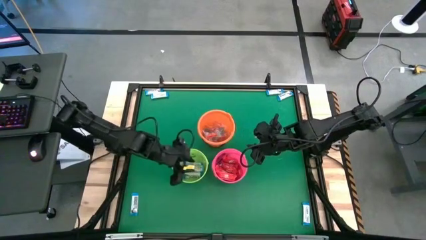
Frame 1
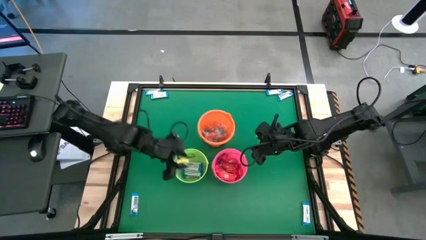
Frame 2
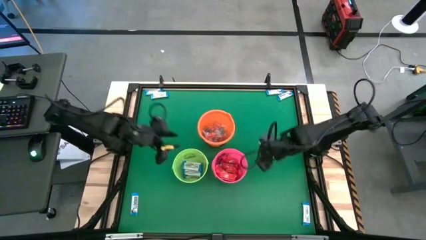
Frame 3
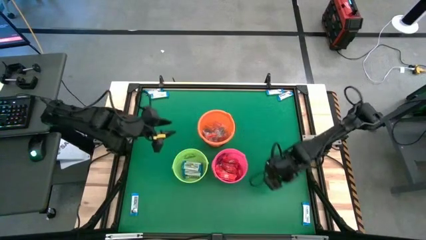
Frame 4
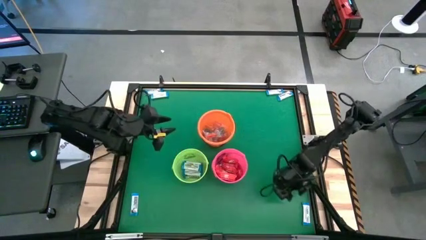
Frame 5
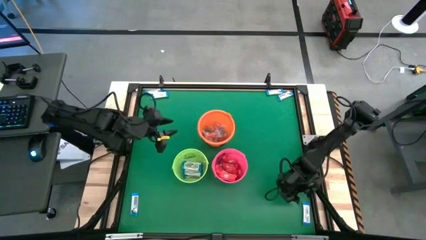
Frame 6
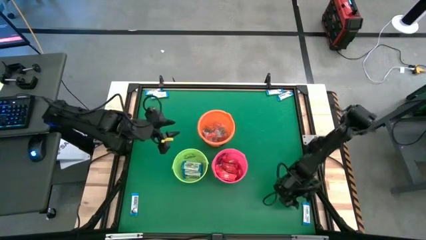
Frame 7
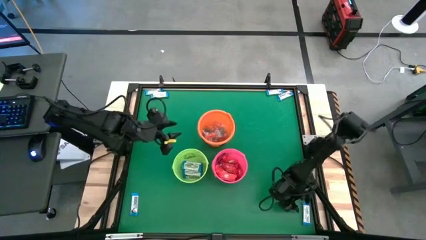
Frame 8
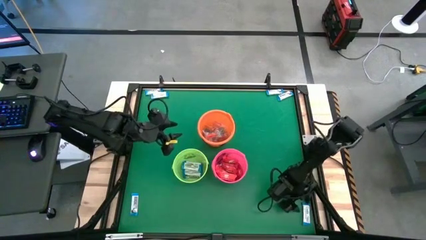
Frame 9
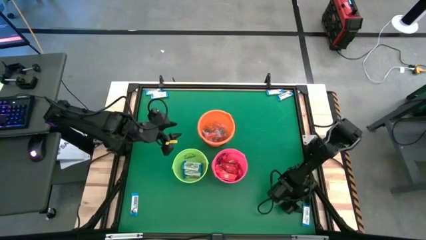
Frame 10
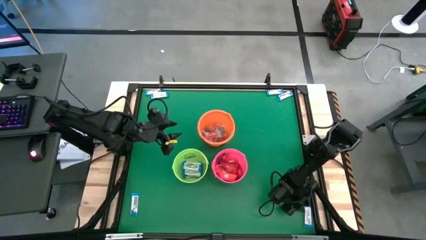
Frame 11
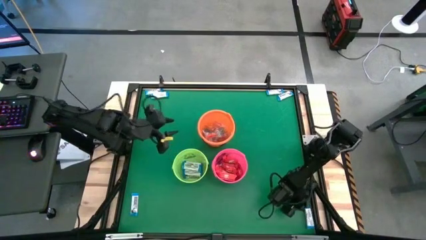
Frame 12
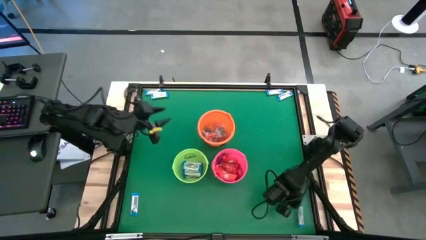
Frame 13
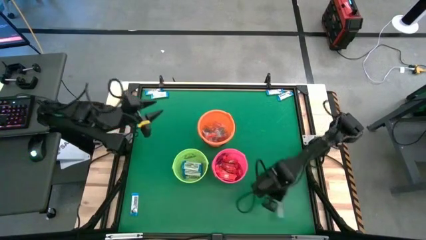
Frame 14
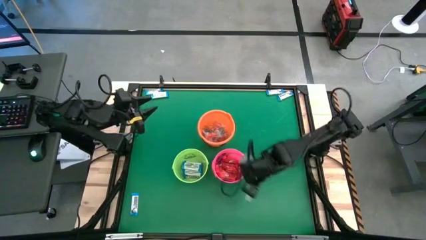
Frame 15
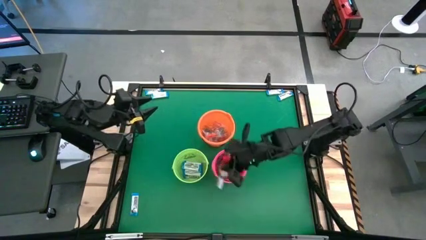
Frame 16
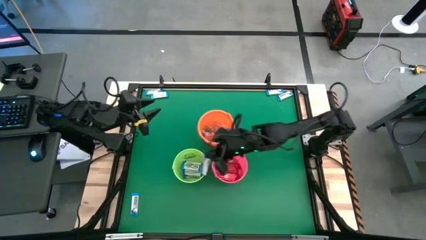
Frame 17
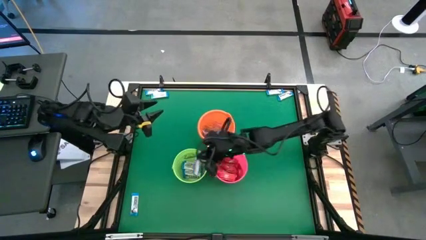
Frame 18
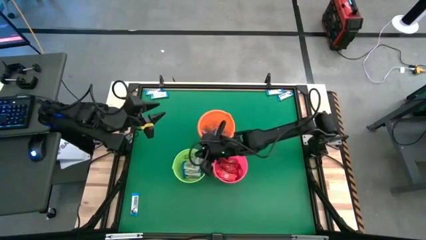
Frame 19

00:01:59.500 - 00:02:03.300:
Task: Sort candy by brand, put in halloween buckets
Put the white chocolate bar into the green bucket

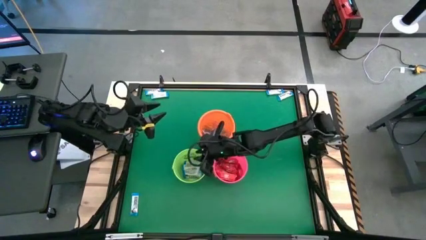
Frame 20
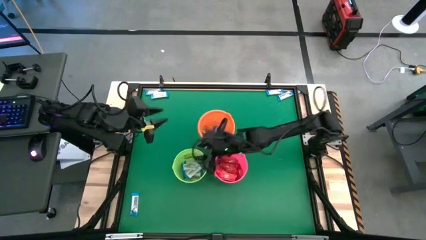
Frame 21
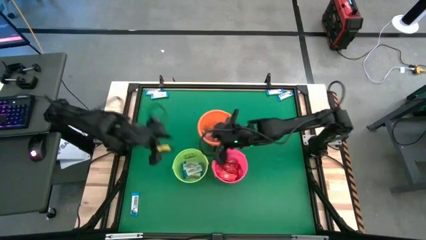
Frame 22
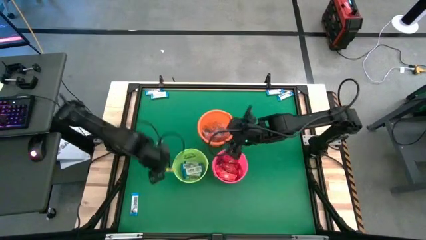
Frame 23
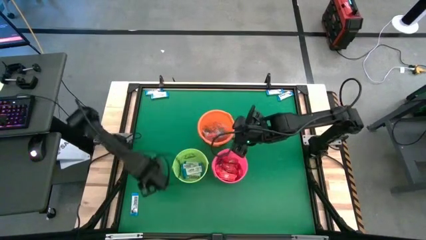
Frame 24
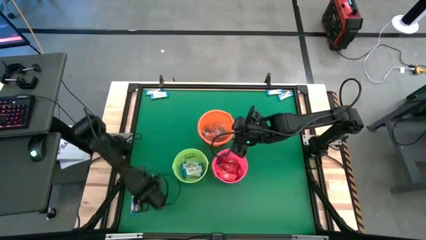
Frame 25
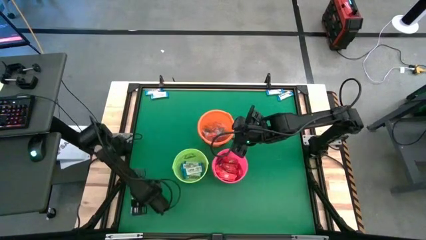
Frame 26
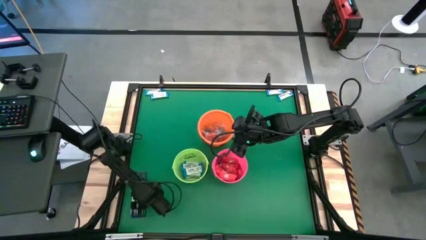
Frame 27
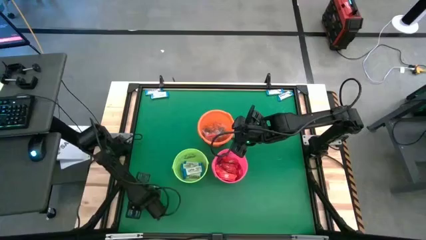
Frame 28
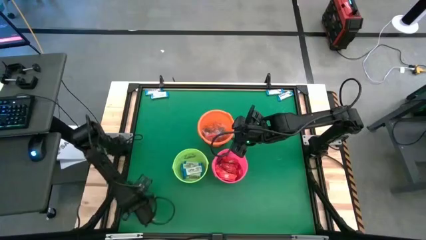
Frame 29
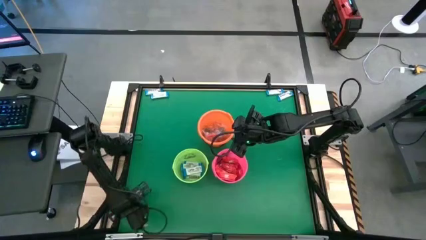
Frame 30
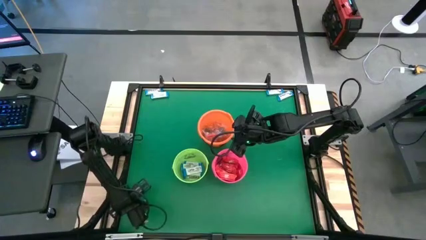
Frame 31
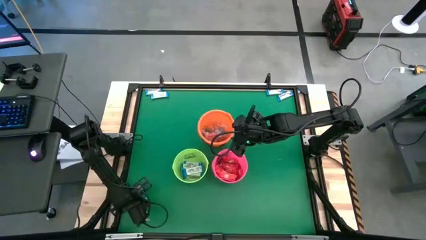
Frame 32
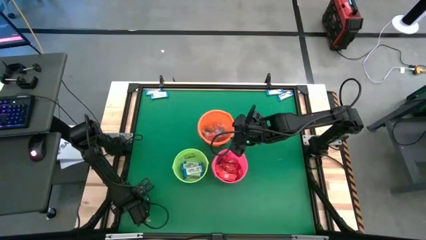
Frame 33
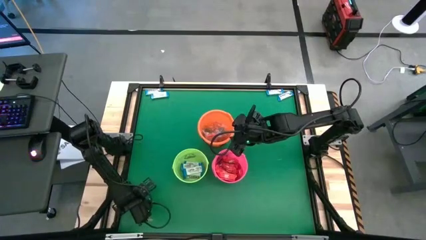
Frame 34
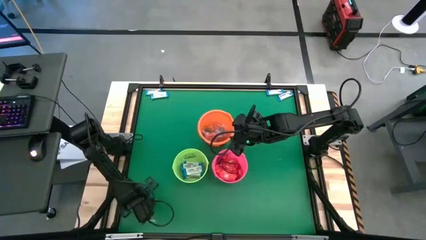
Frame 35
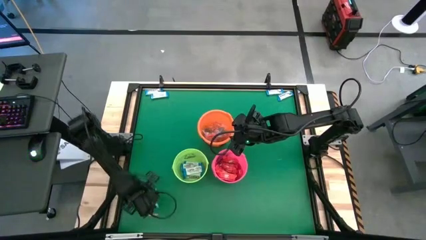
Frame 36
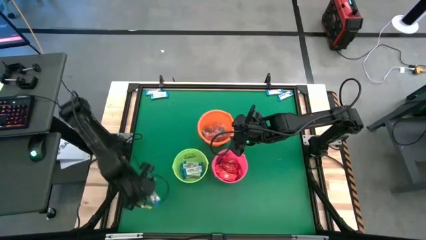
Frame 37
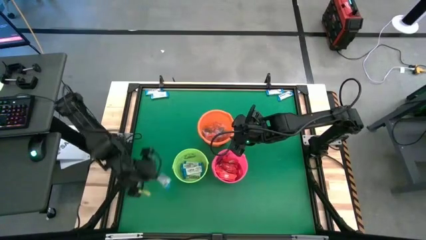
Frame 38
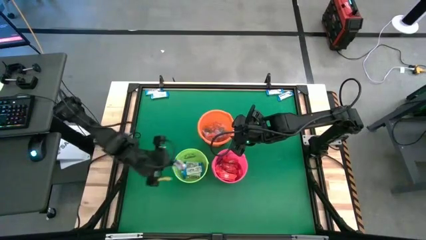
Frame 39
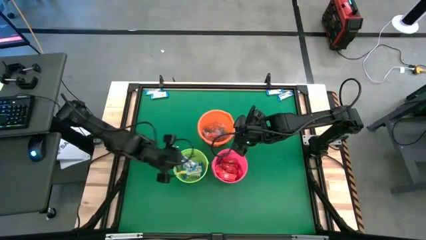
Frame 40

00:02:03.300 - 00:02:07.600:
Put the white chocolate bar into the green bucket

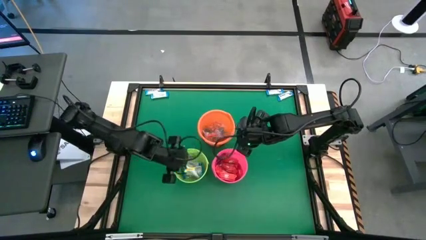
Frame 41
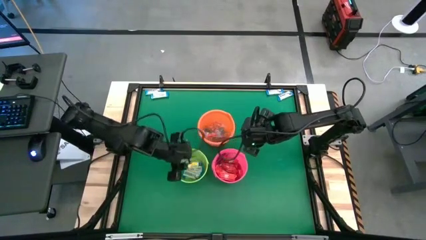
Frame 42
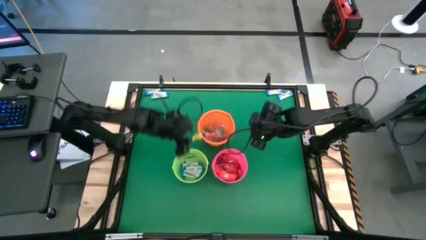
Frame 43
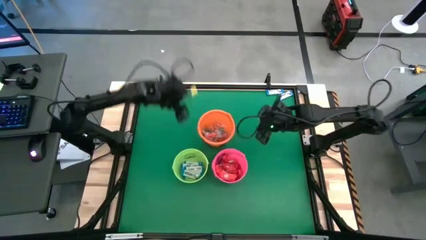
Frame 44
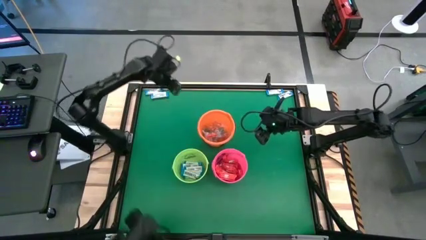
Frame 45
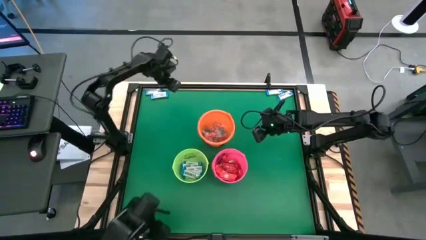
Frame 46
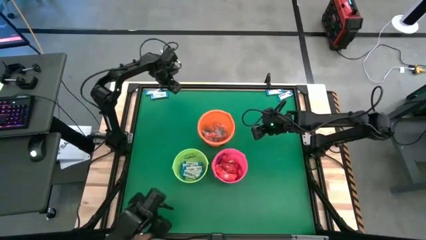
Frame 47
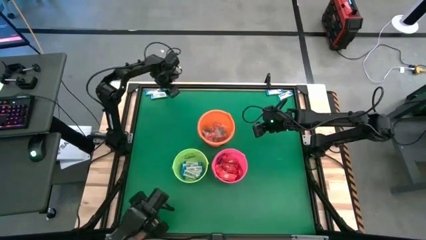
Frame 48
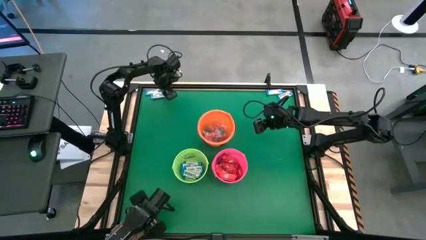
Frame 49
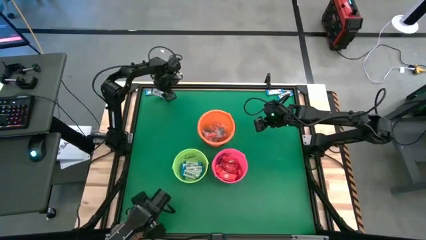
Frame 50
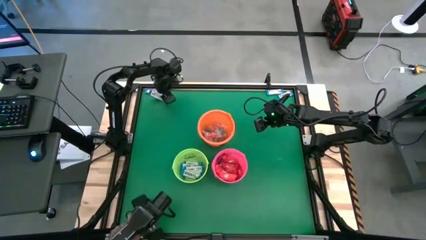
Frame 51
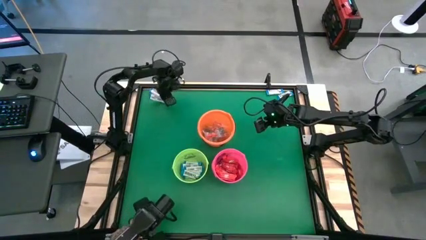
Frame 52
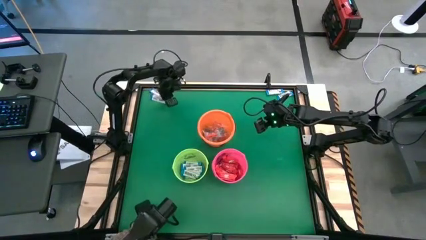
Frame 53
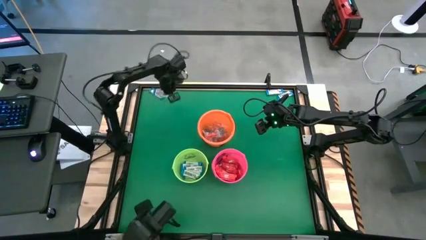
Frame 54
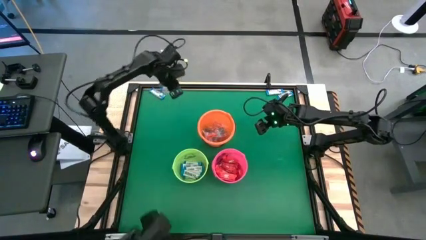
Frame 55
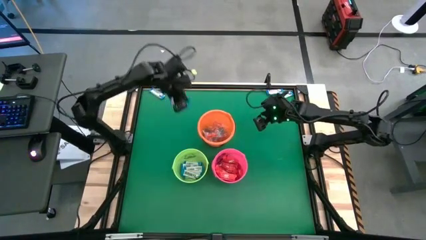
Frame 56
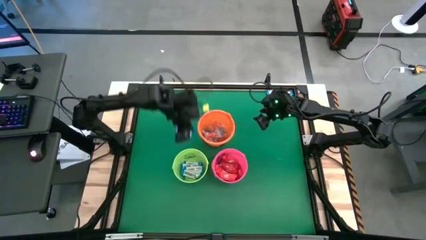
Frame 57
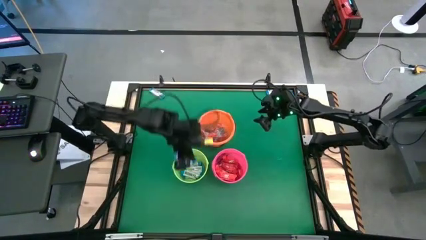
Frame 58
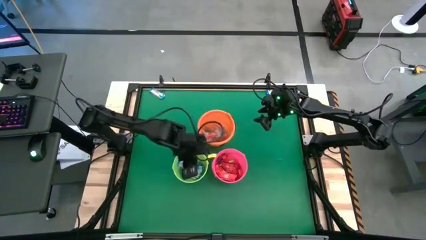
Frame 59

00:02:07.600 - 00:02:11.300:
Put the white chocolate bar into the green bucket

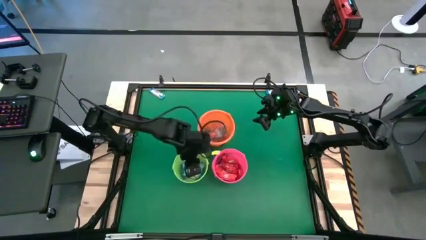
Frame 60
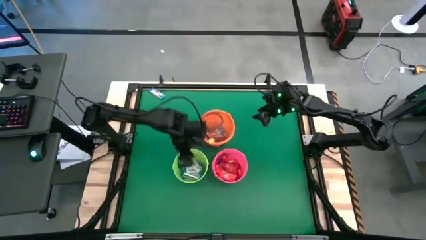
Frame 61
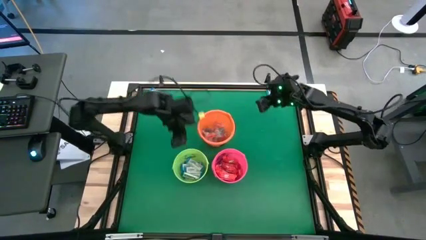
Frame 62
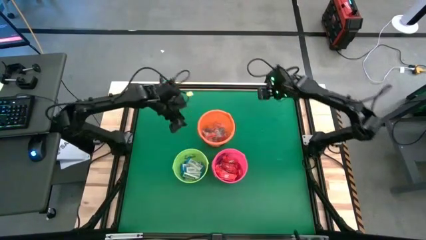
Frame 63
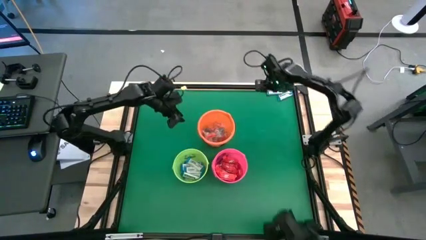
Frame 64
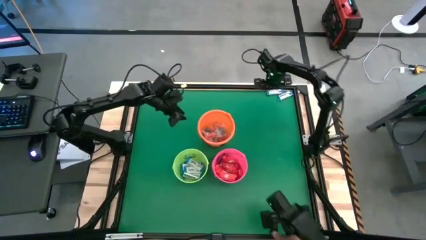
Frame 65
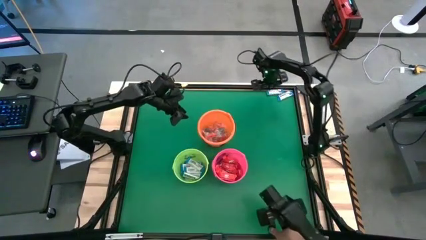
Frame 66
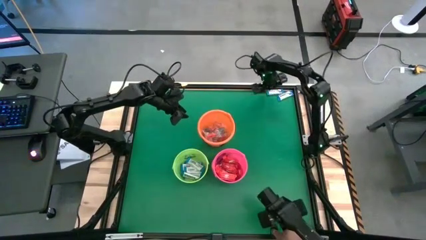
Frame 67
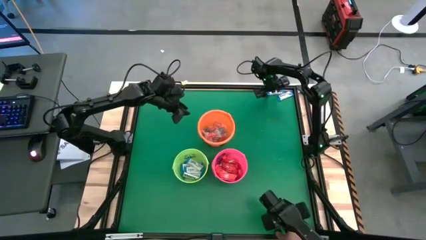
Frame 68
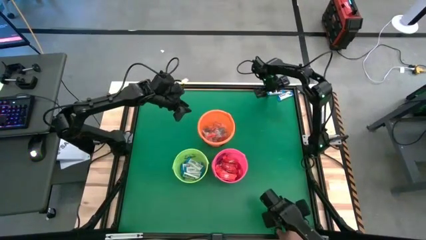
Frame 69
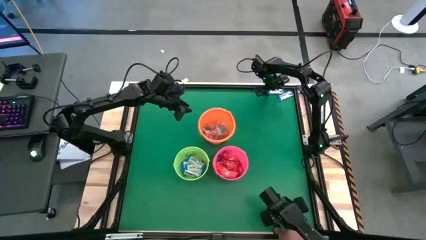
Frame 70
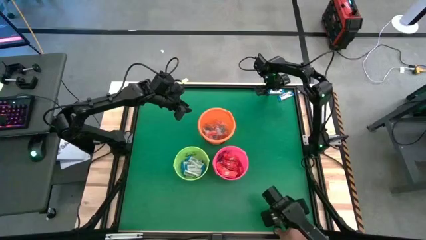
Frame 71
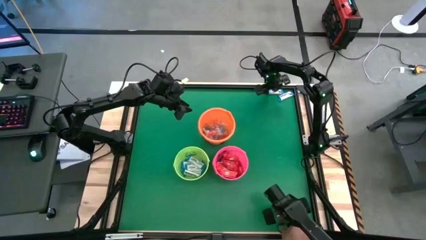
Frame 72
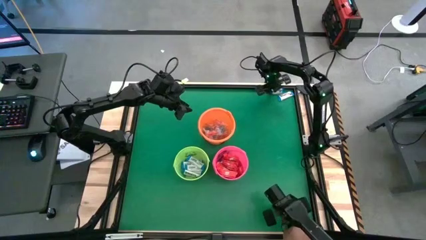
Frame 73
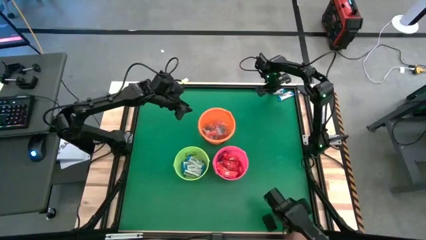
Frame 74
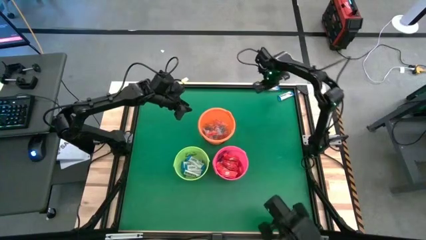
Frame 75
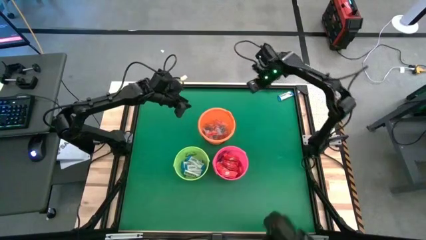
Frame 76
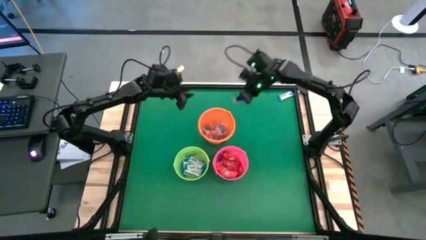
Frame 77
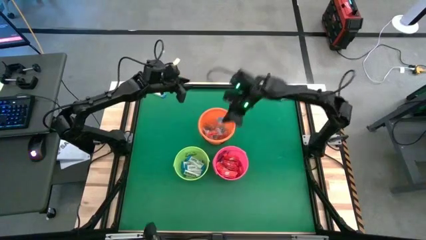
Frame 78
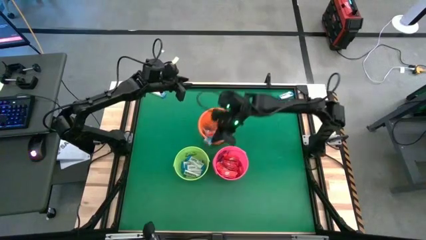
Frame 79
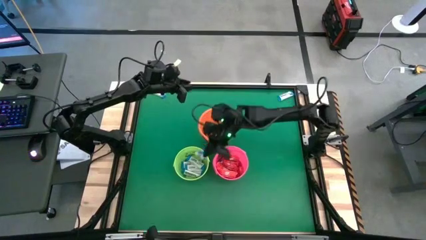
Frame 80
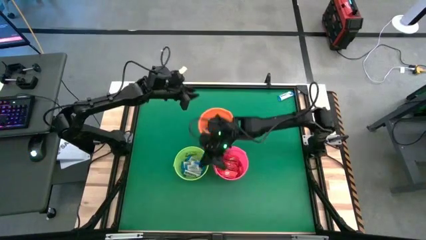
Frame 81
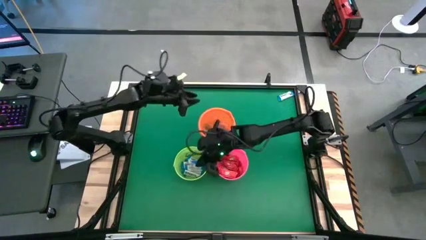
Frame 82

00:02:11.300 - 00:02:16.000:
Put the white chocolate bar into the green bucket

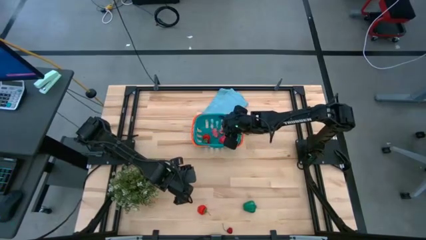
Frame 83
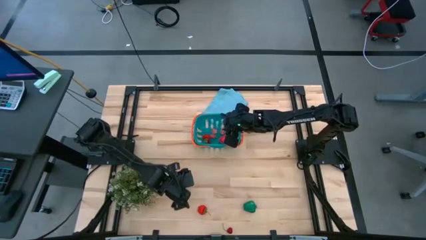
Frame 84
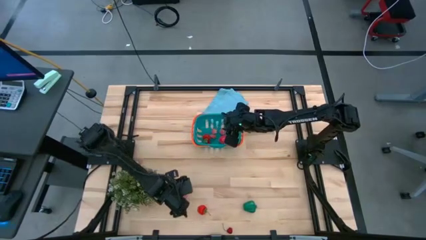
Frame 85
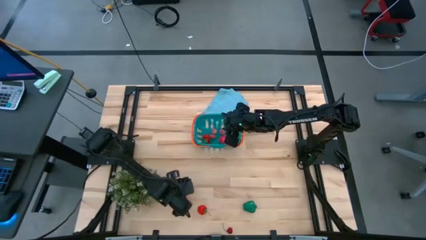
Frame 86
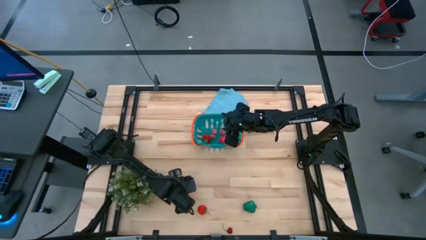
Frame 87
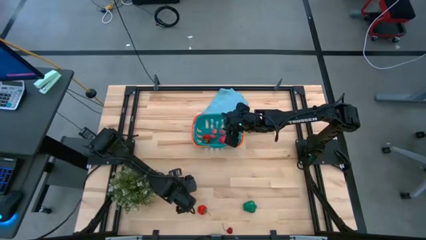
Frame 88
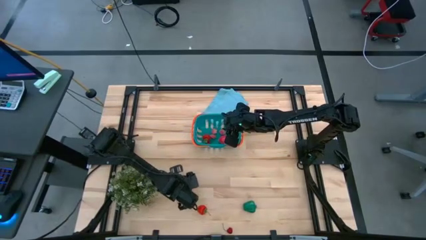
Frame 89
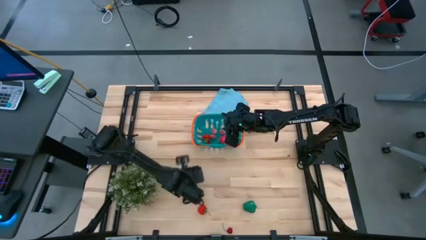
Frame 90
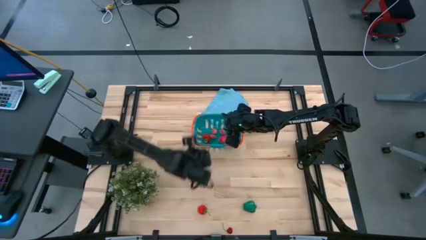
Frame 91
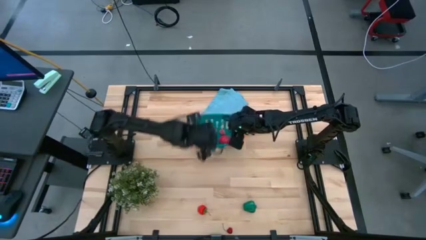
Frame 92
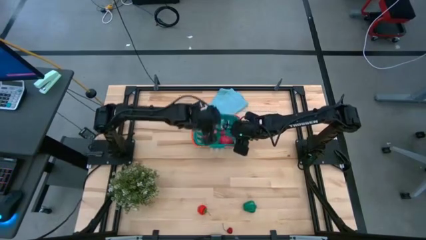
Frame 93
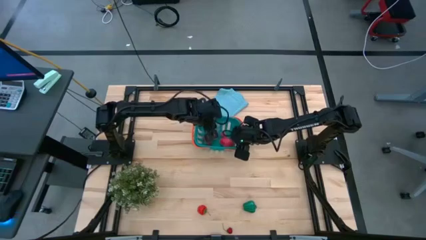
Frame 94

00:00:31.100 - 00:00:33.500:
Task: Pick and placing Produce into tupperware
Put the pink peach into the bin
